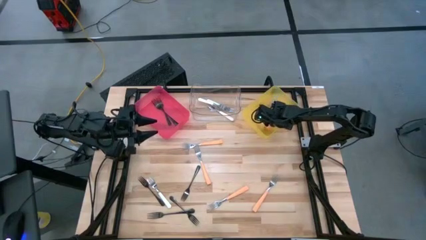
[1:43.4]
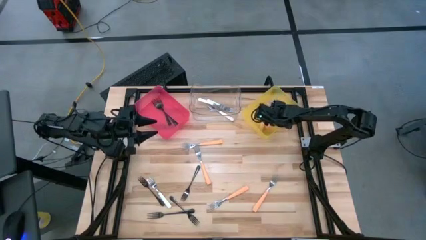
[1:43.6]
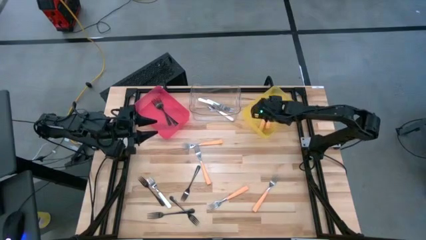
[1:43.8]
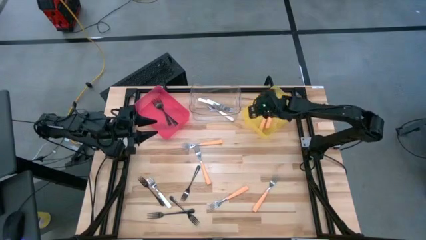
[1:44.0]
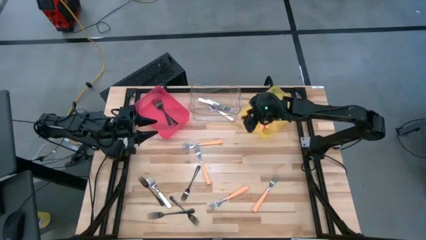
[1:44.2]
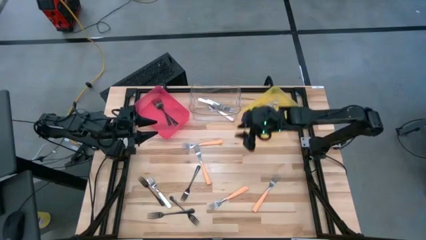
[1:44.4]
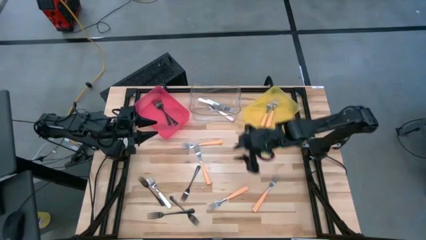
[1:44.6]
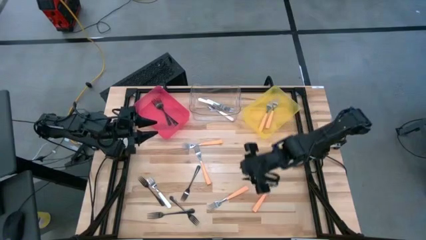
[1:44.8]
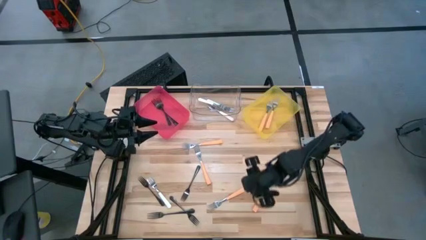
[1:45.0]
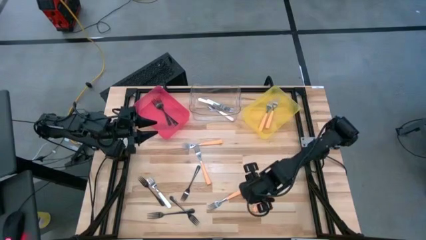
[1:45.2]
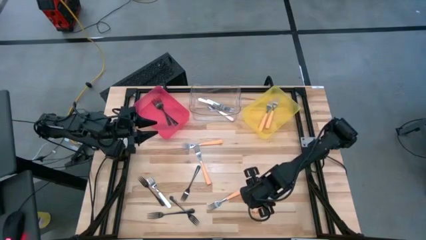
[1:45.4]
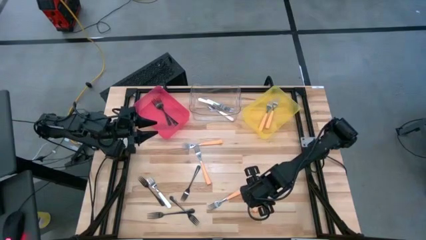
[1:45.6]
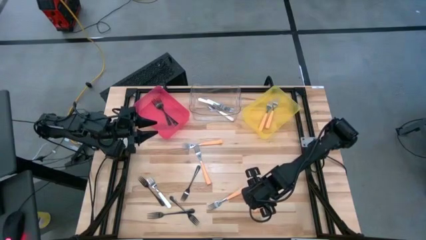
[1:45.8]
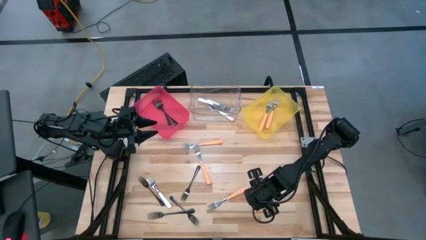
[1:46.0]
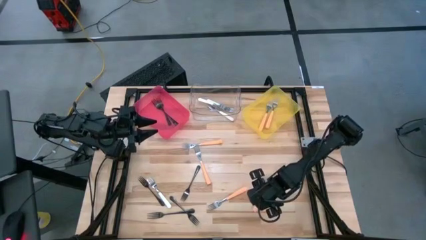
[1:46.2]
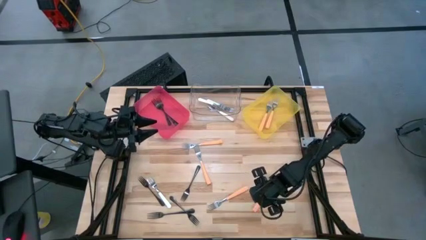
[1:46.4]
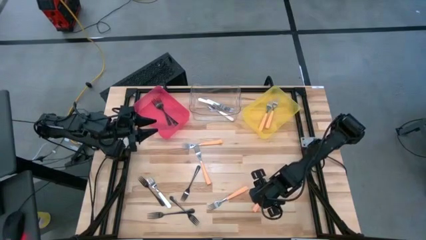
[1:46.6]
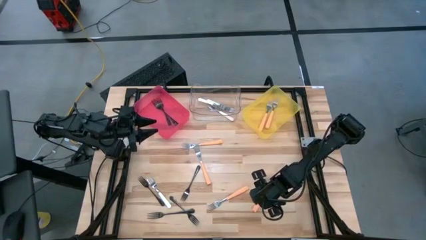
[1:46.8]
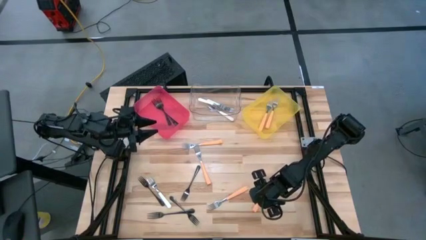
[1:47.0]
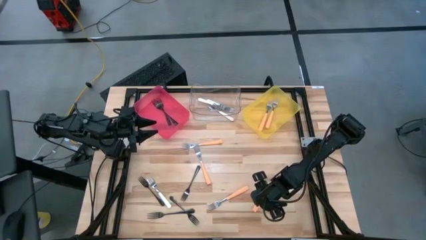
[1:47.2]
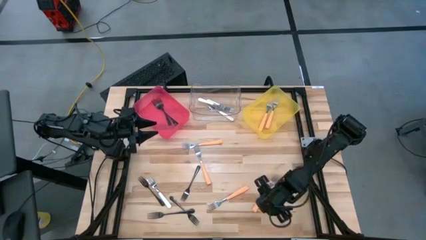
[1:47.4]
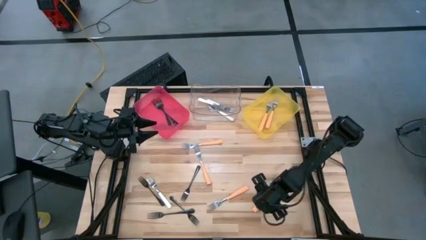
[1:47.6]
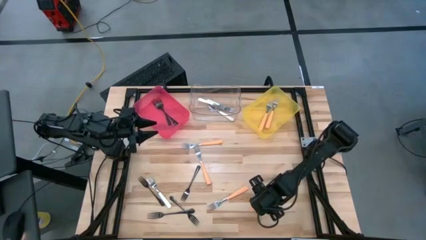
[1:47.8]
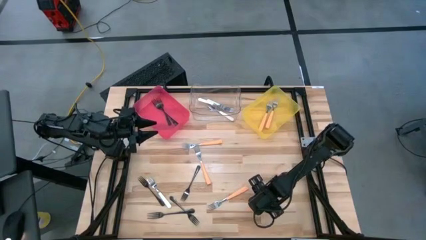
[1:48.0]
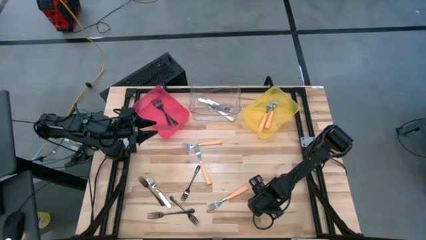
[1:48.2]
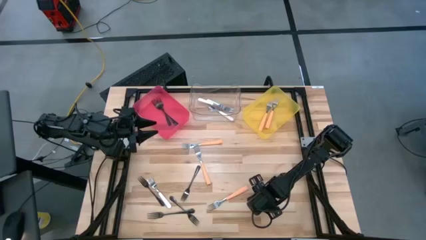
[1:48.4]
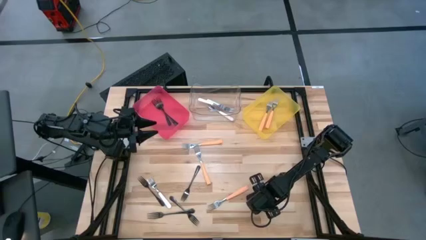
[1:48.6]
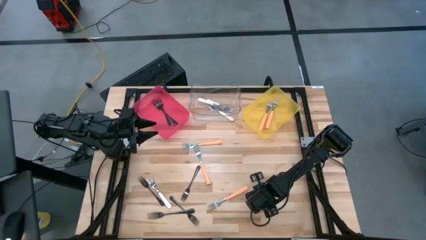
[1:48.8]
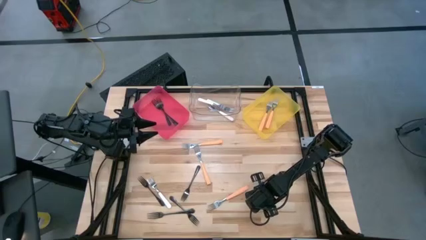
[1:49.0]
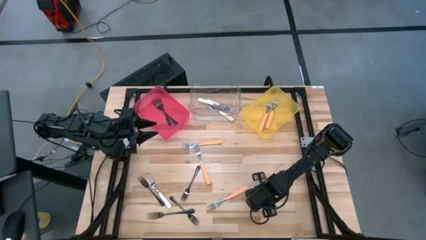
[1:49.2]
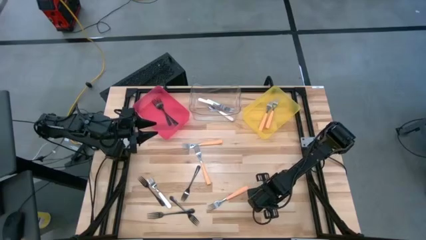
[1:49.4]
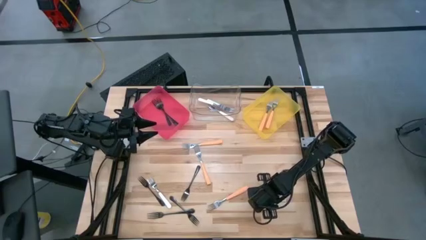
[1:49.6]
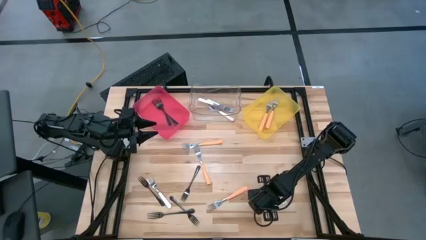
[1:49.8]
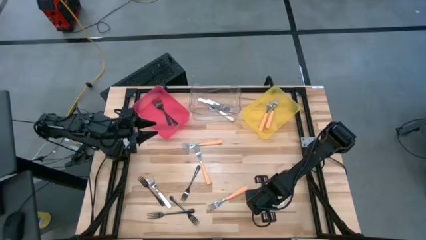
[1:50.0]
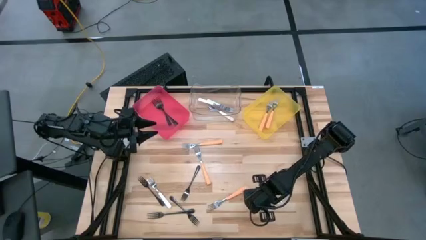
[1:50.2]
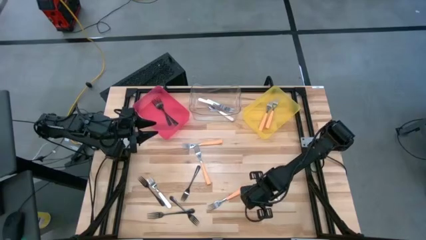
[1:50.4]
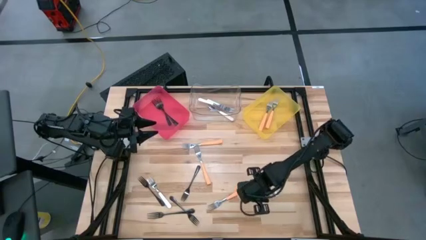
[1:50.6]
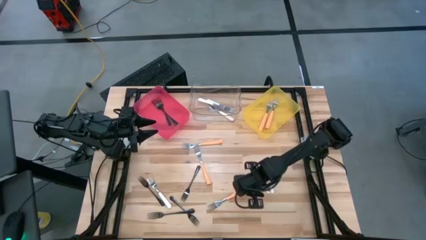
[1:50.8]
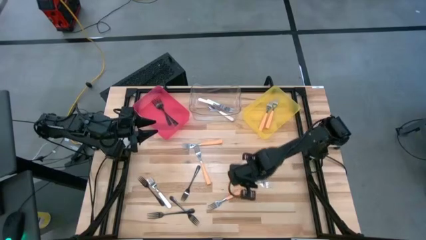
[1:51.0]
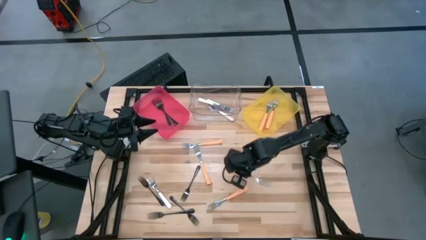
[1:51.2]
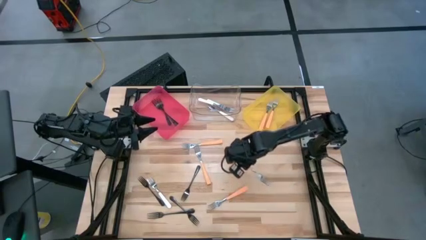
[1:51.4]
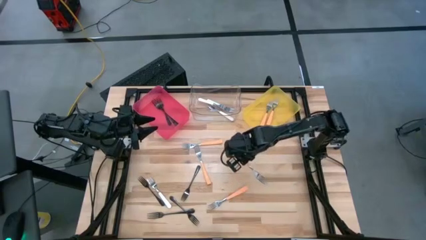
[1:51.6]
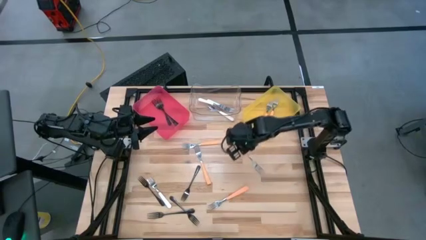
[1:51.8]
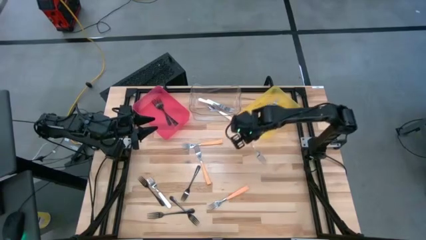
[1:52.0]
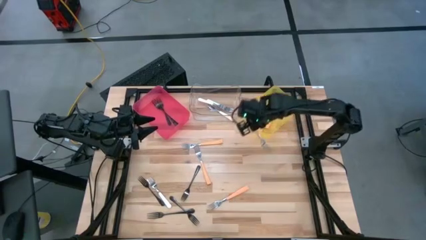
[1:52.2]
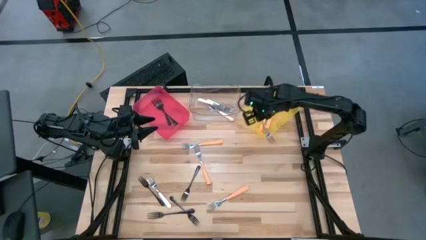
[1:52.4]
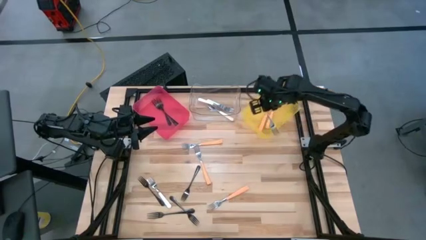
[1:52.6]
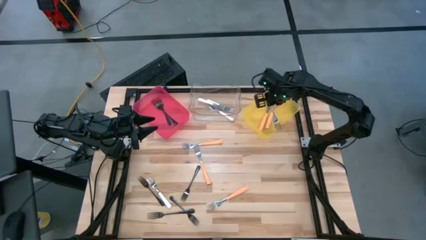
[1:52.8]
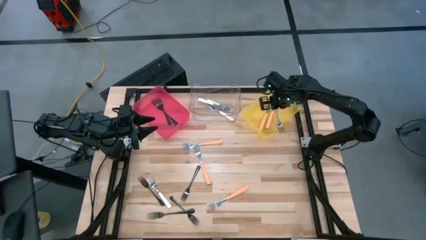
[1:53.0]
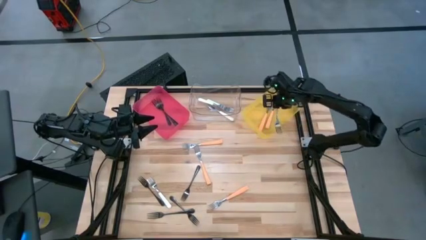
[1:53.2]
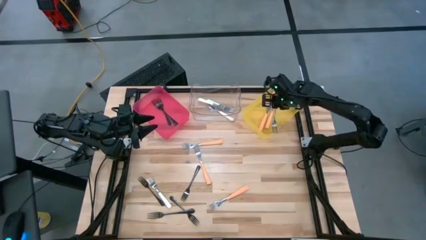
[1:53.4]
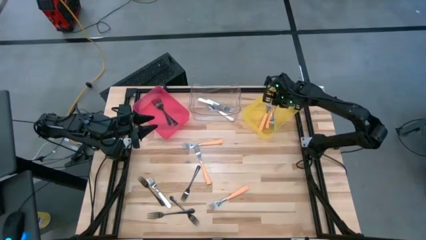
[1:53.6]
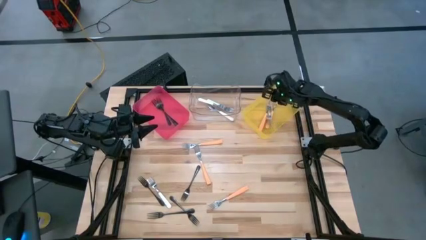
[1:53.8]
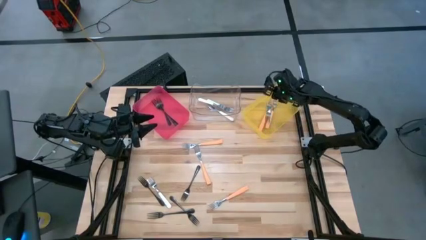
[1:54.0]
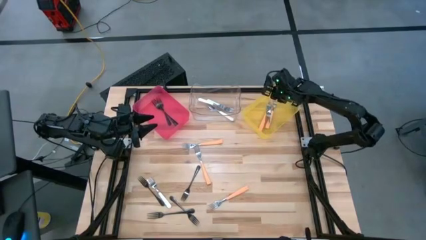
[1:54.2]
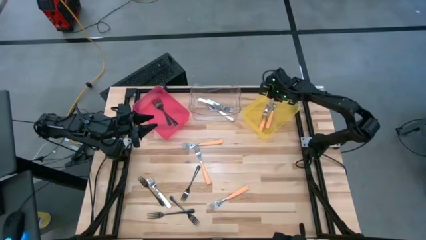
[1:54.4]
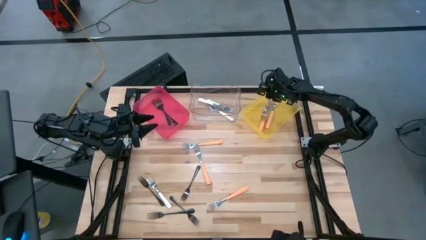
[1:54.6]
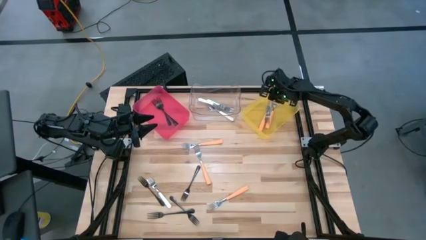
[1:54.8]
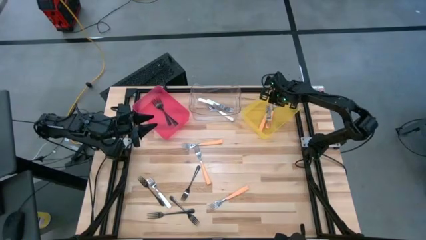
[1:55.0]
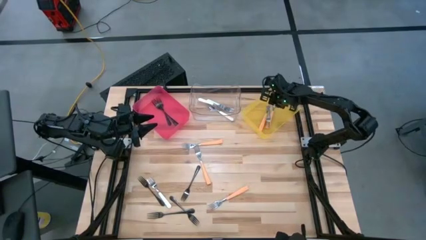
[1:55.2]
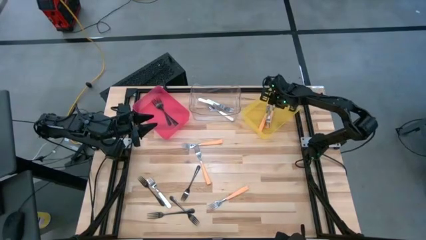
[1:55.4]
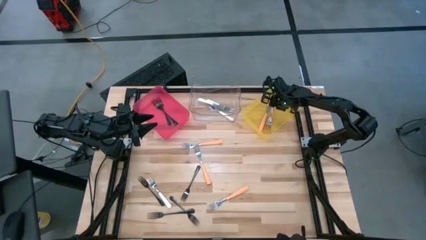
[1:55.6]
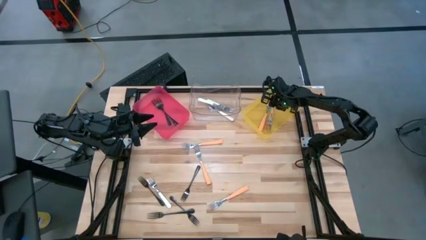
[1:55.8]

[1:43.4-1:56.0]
Task: Sort silverware by color (type)
Put the orange fork into the yellow bin
